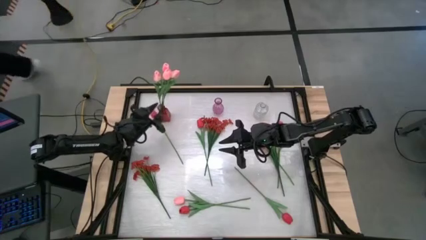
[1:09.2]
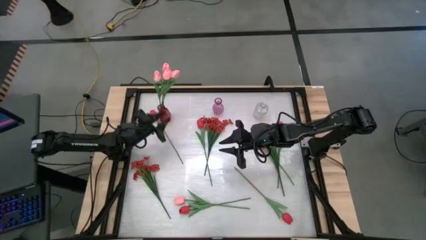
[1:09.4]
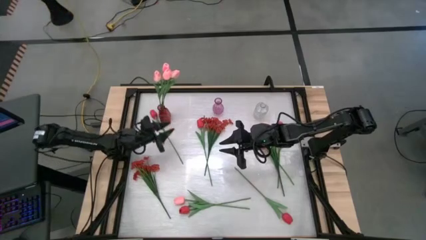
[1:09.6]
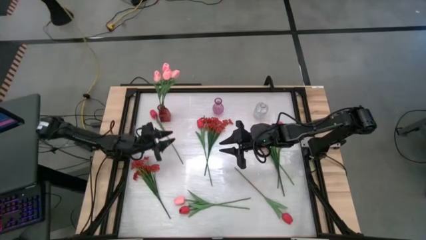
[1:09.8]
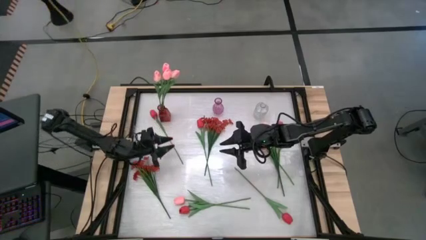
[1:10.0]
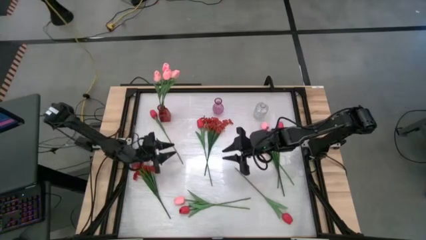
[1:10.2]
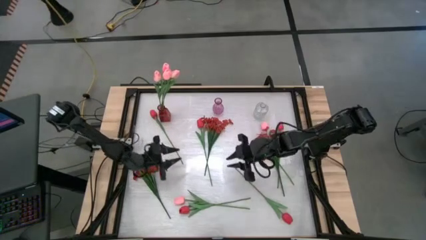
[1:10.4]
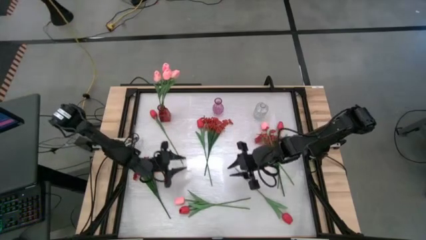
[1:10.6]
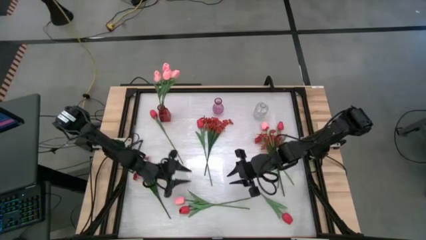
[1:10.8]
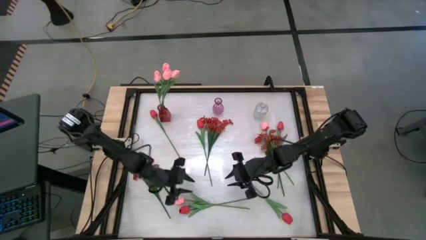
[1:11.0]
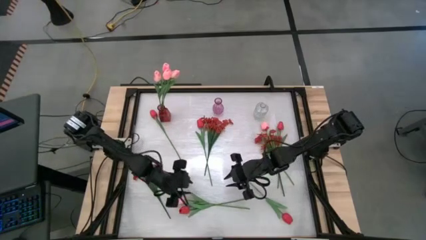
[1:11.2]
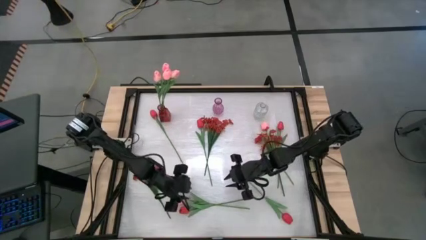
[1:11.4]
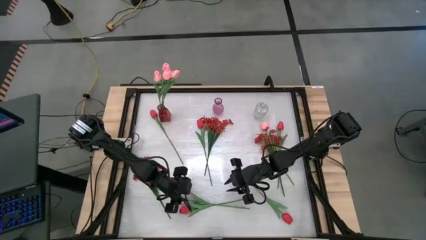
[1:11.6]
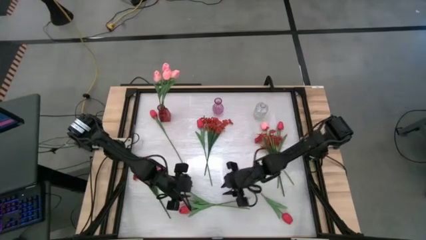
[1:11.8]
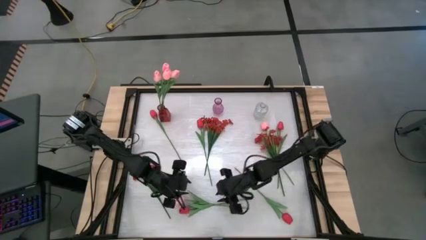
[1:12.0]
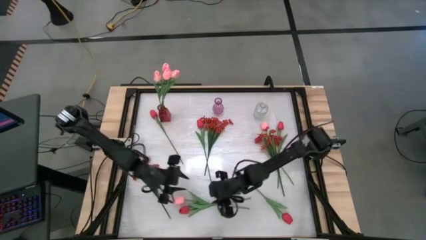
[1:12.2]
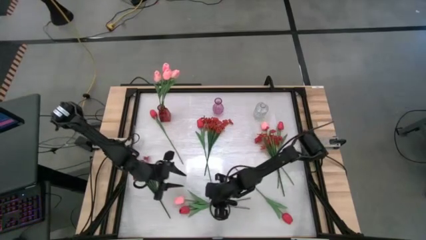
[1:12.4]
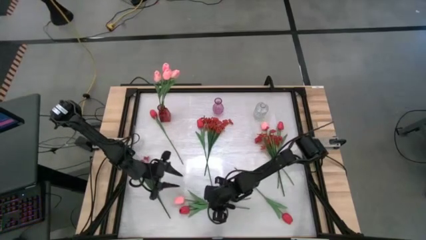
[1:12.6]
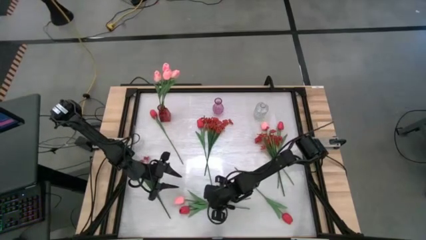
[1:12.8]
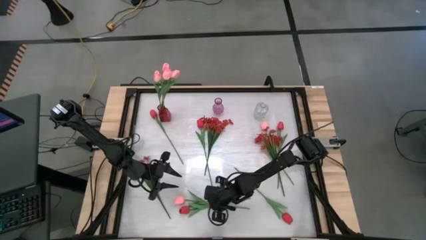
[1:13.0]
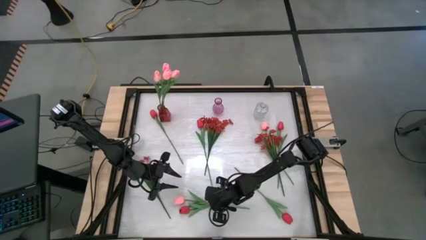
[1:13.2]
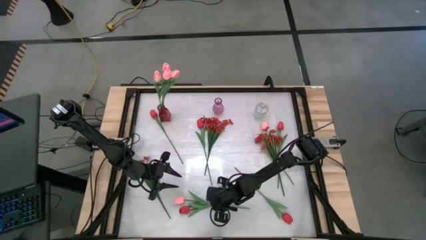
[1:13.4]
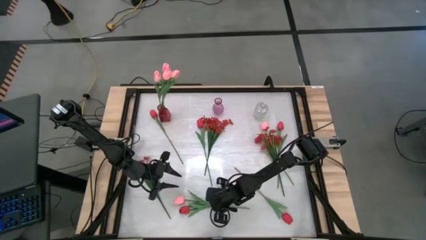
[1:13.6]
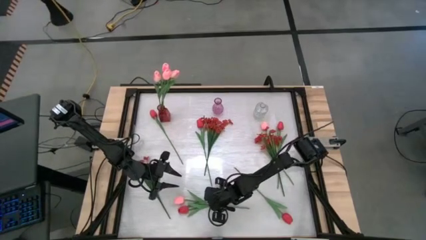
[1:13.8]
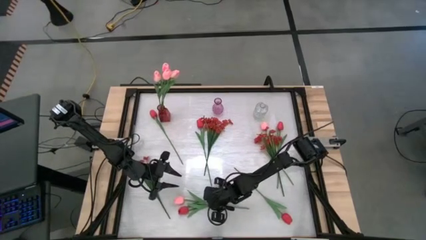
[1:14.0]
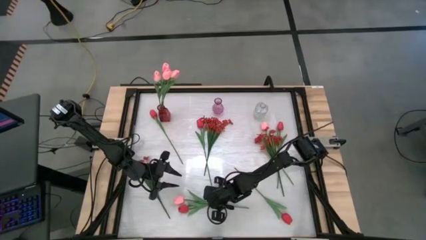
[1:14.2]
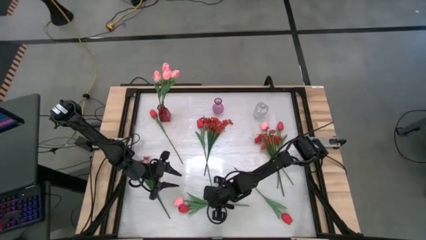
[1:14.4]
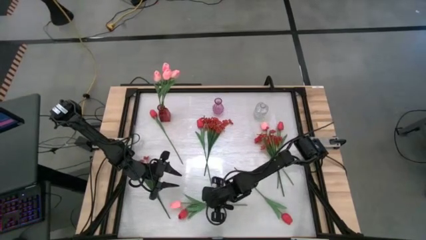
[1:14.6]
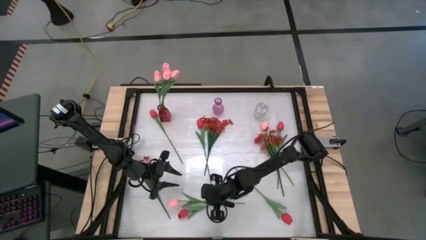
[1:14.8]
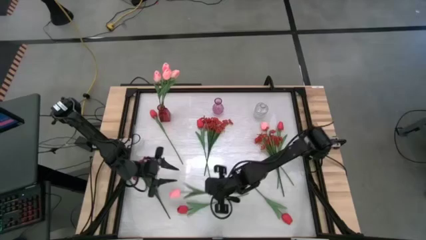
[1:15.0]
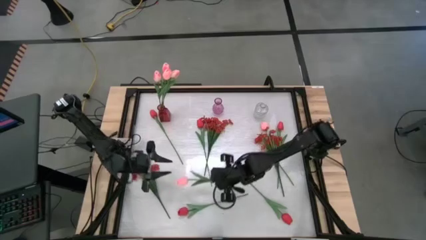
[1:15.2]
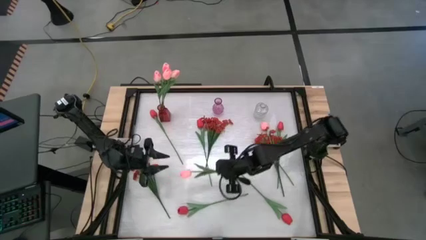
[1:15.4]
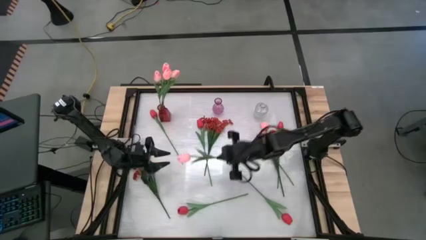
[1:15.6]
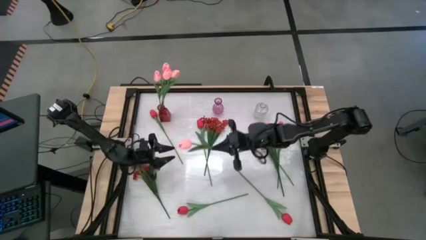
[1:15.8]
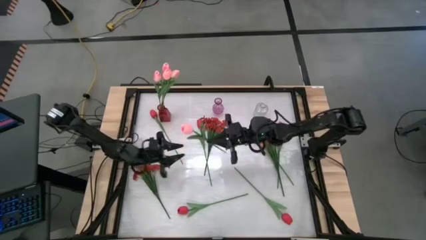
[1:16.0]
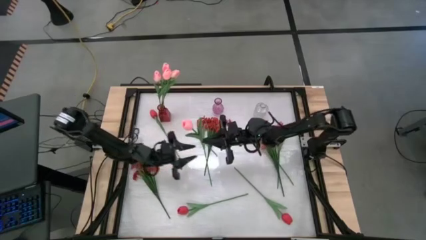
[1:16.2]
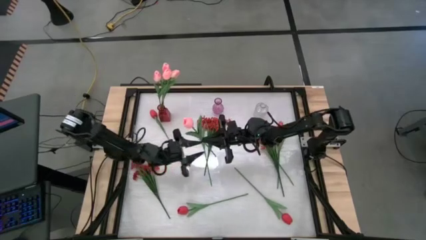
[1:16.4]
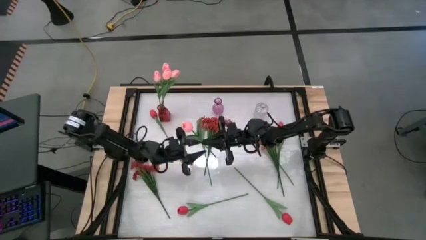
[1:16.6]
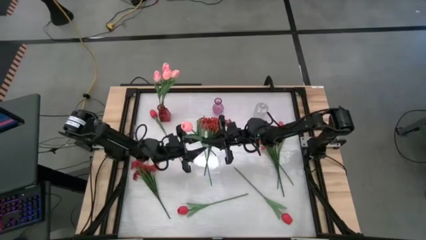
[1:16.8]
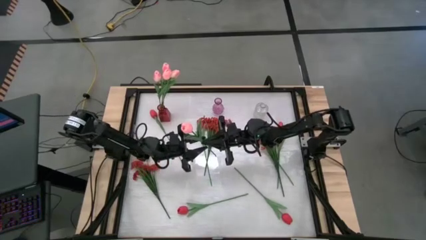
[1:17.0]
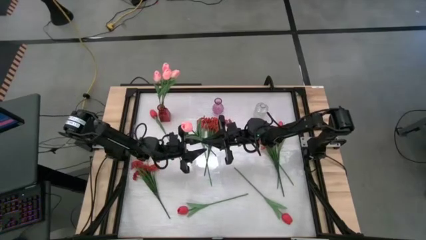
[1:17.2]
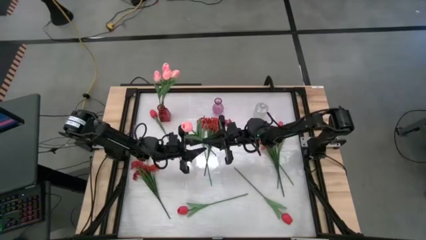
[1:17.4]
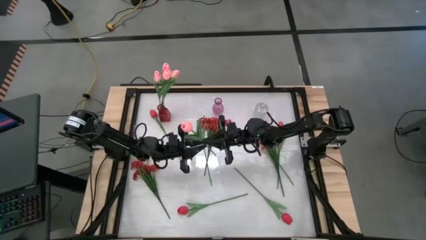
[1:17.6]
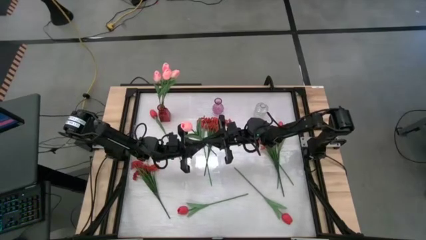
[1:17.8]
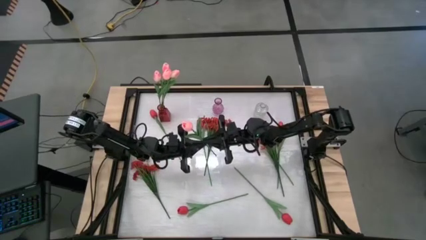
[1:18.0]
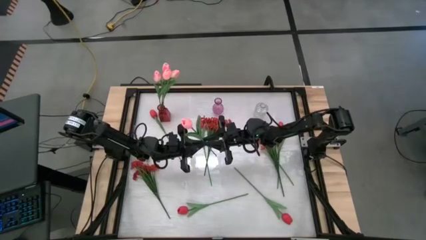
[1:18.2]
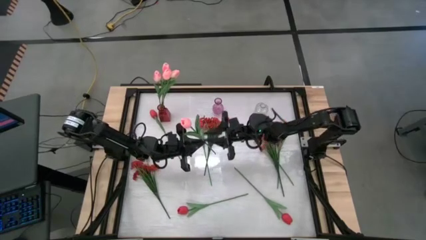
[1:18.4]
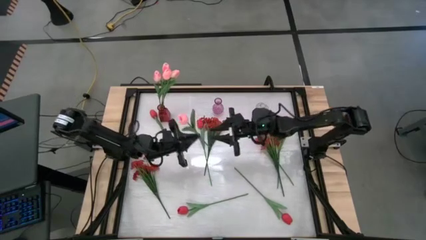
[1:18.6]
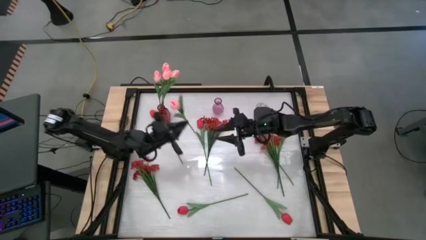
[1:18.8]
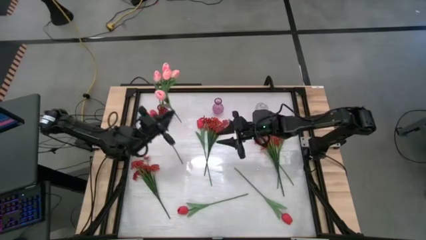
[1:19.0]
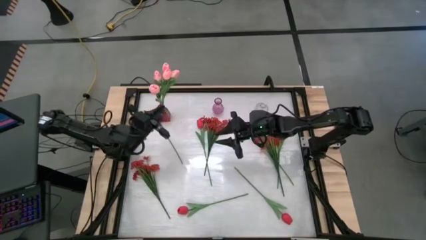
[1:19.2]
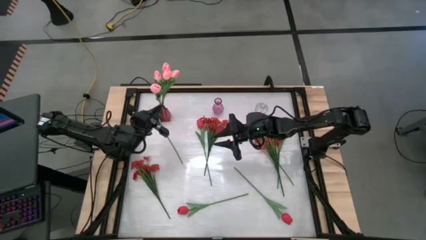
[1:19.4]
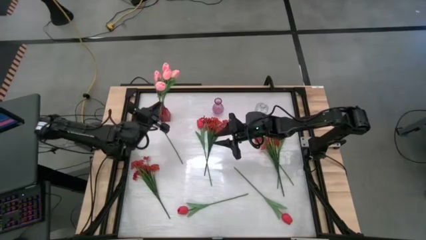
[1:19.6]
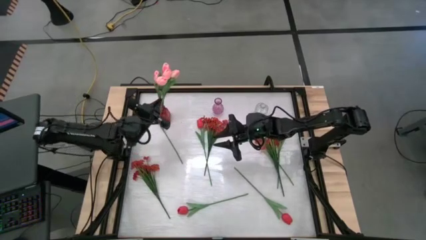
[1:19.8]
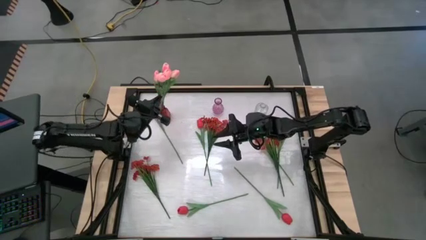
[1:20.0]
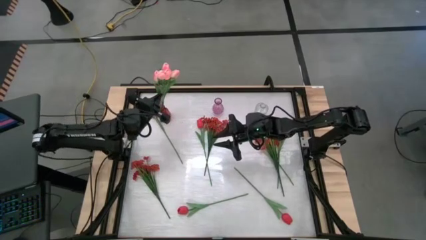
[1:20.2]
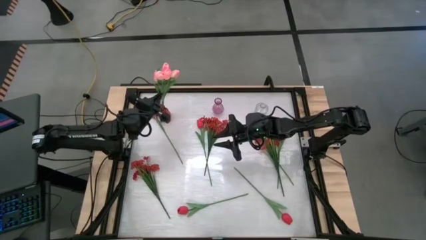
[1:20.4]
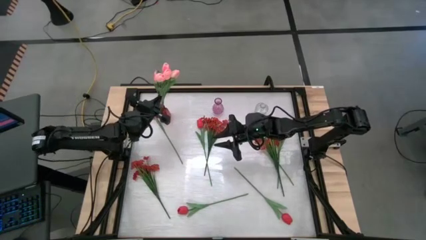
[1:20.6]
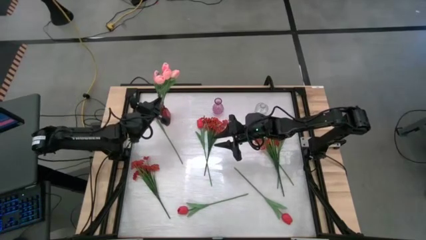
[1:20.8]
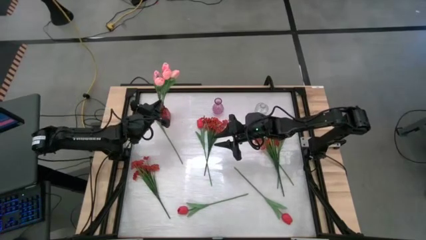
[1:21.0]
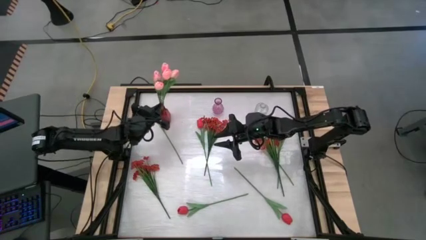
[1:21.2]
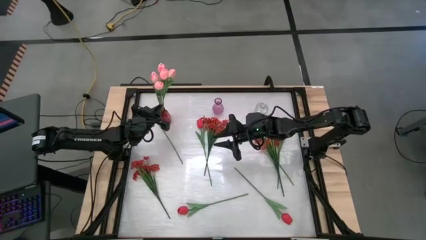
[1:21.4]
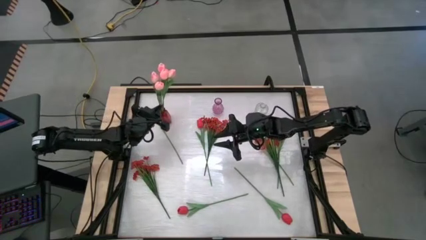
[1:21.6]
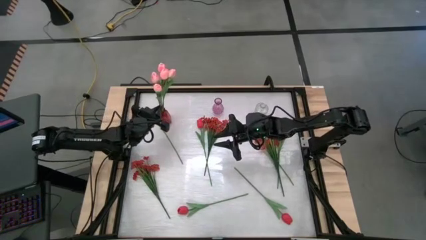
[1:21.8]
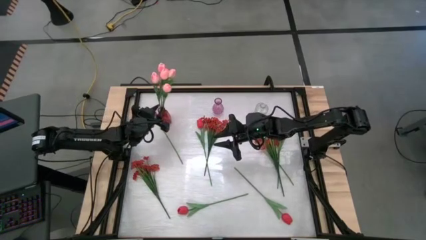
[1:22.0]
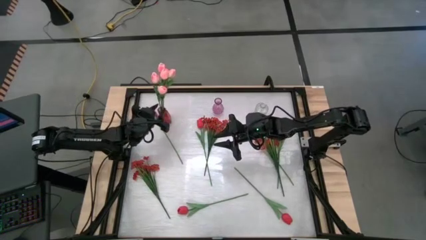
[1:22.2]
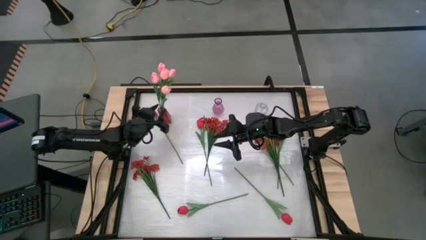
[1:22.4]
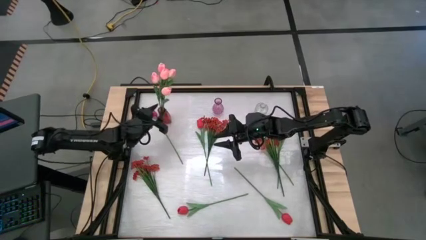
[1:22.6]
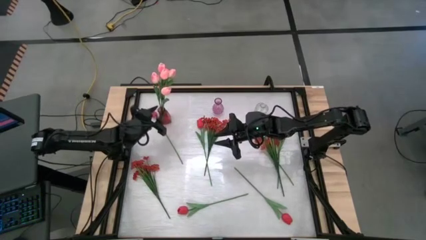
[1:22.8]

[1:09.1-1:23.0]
Task: Sort flowers into vase by color
Put the pink tulip into the red vase

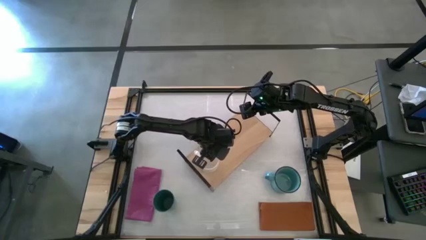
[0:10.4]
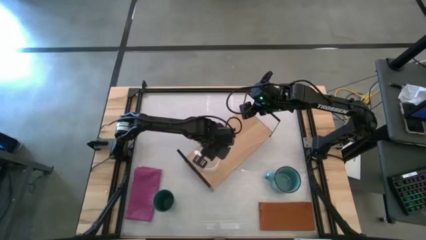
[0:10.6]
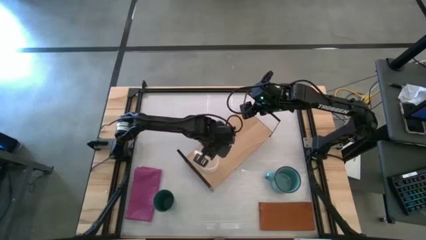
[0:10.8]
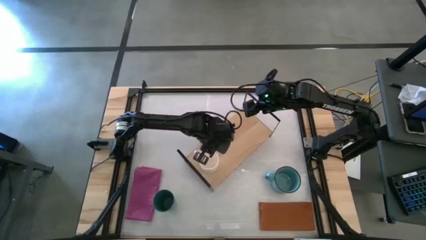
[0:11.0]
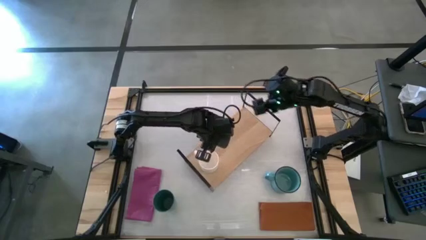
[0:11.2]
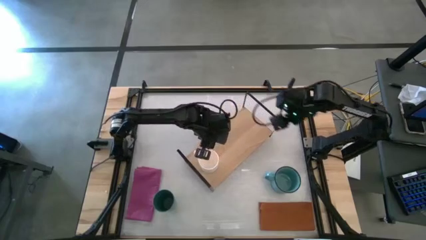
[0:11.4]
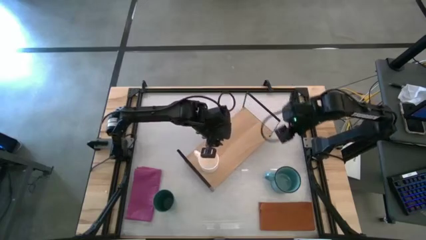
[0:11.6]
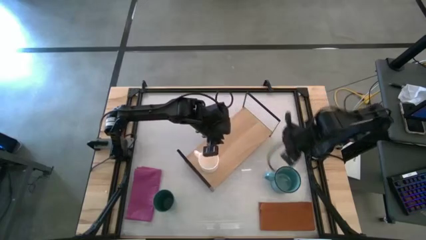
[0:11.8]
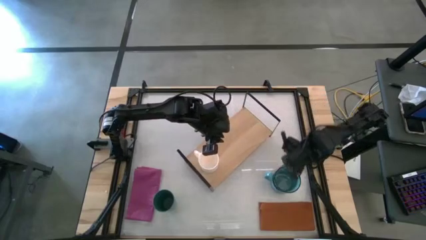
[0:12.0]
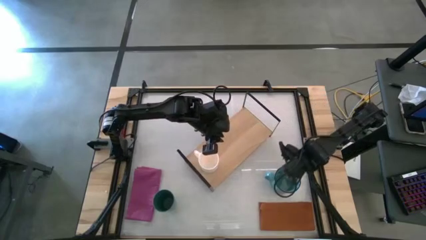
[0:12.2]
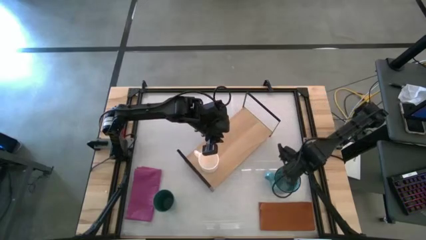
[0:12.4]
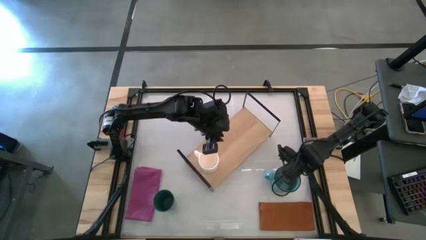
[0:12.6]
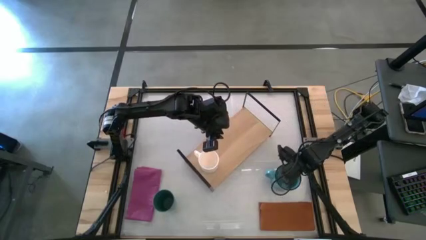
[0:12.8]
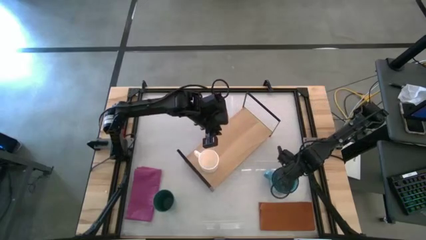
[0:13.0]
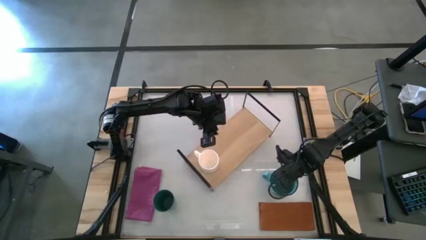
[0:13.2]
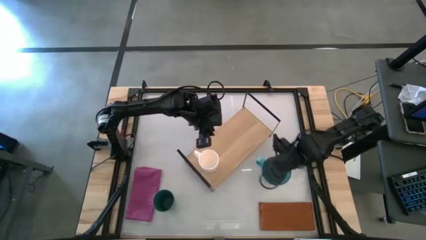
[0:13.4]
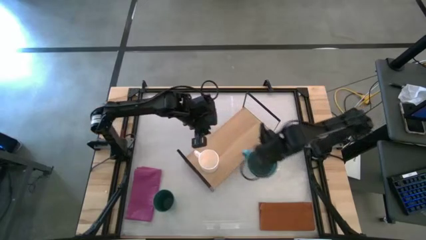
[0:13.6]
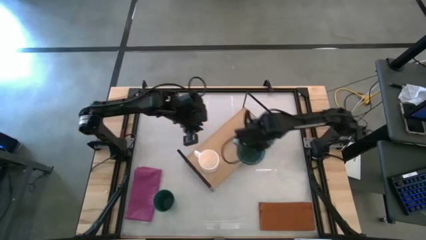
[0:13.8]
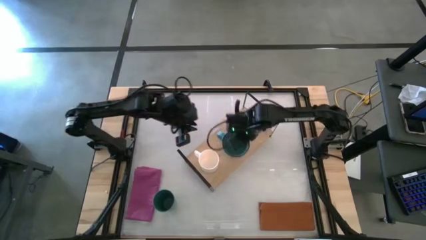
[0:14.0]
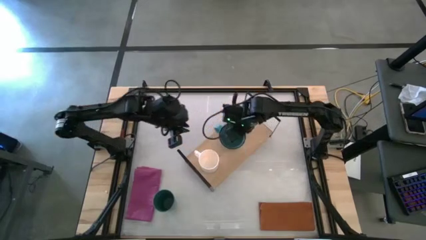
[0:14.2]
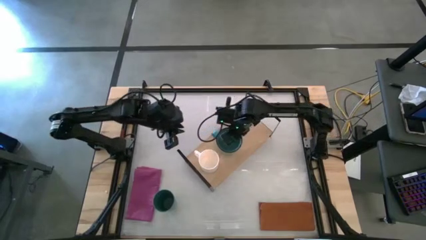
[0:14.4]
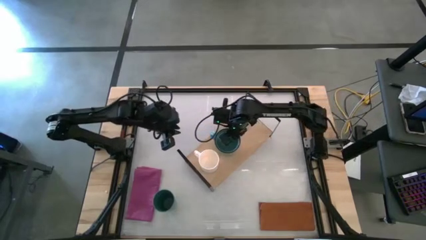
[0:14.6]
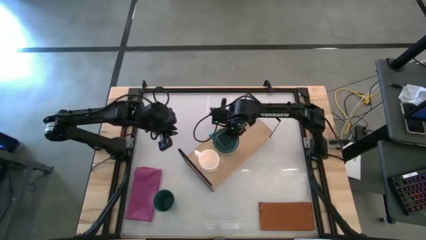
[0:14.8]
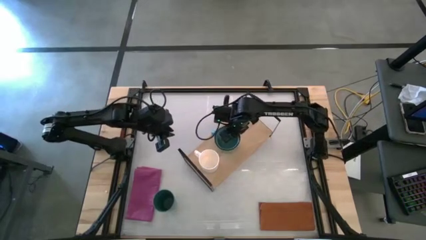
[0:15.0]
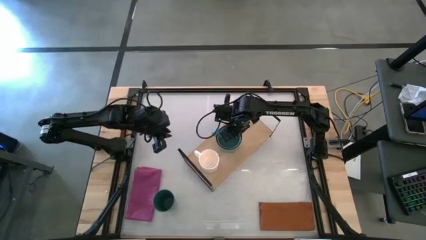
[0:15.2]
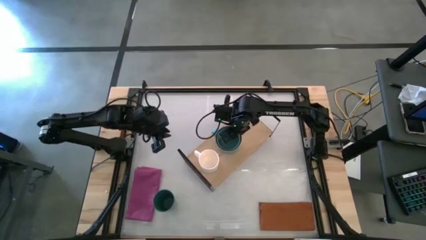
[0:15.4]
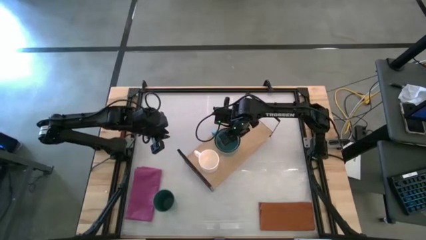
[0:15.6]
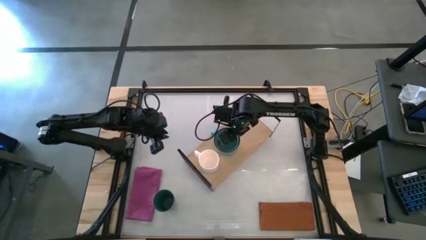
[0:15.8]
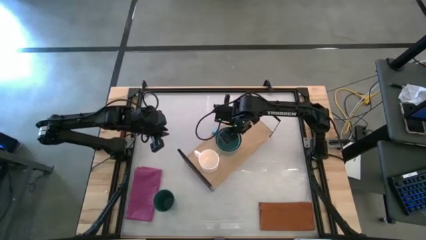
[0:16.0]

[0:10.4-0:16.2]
Task: Stack small to large cups/mugs on shelf
Put the blue mug on the shelf
